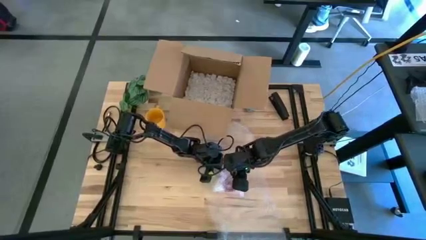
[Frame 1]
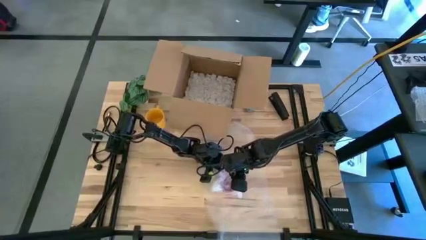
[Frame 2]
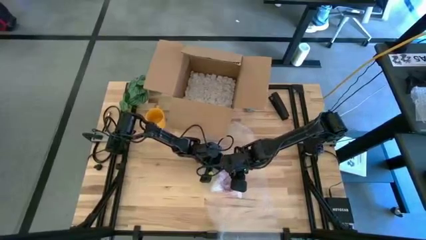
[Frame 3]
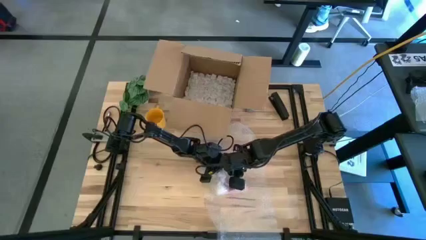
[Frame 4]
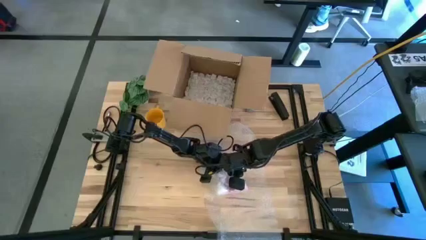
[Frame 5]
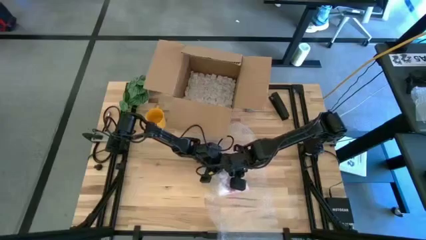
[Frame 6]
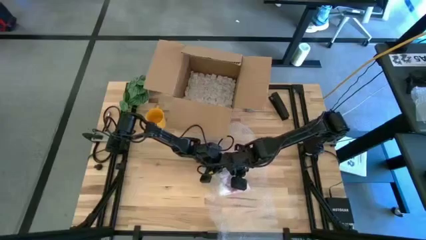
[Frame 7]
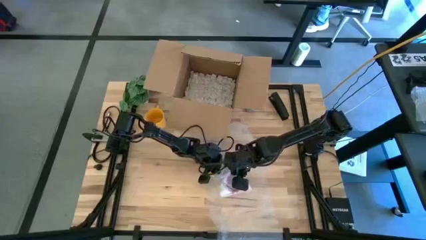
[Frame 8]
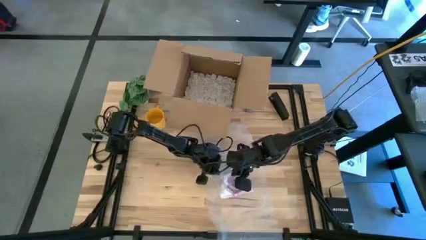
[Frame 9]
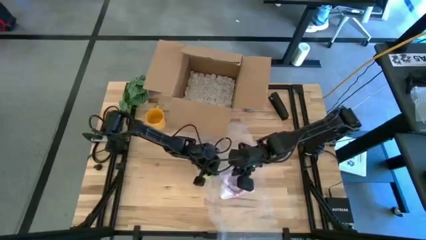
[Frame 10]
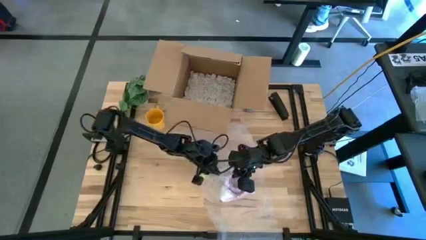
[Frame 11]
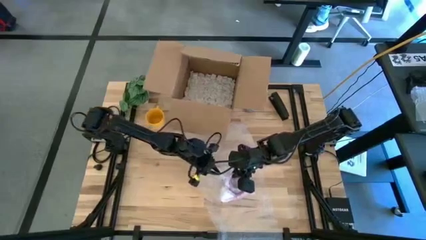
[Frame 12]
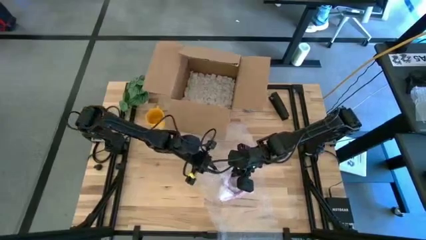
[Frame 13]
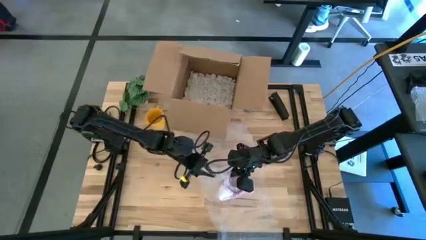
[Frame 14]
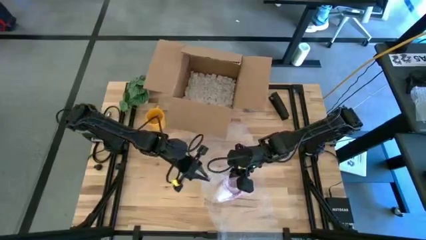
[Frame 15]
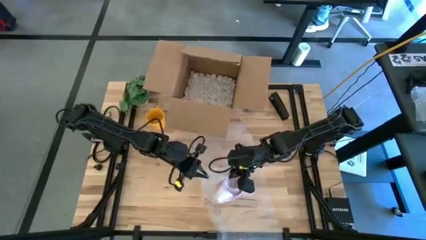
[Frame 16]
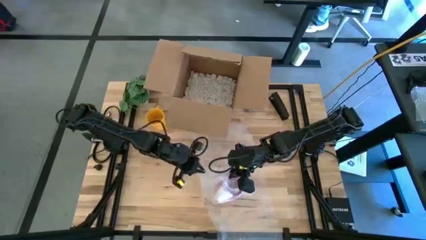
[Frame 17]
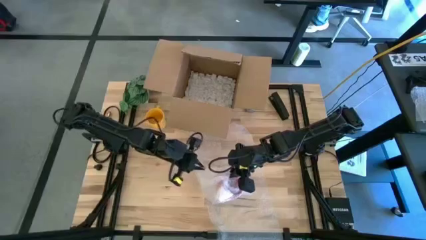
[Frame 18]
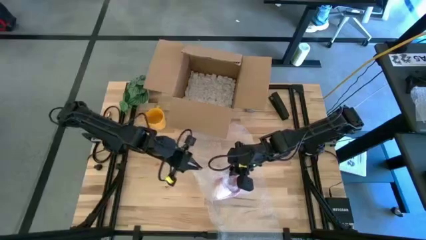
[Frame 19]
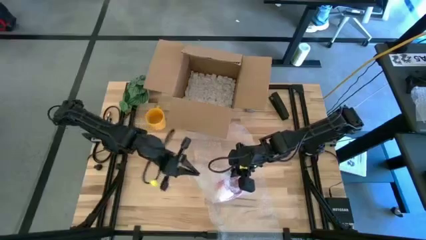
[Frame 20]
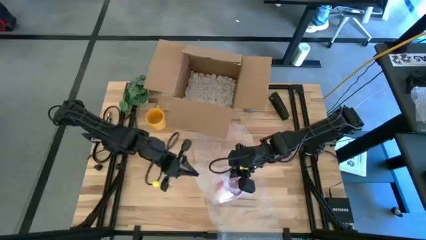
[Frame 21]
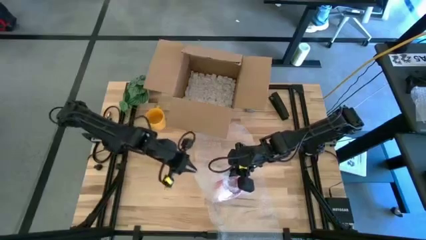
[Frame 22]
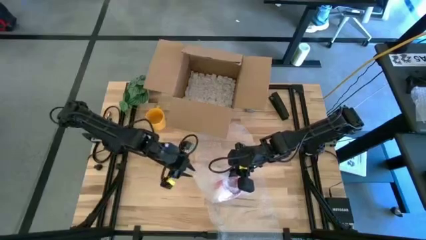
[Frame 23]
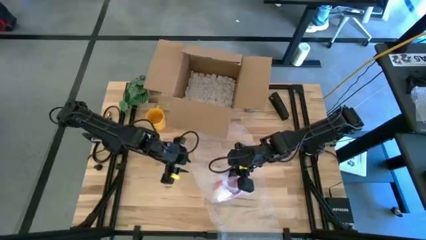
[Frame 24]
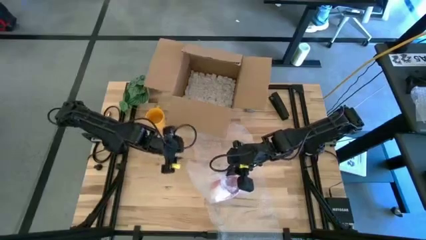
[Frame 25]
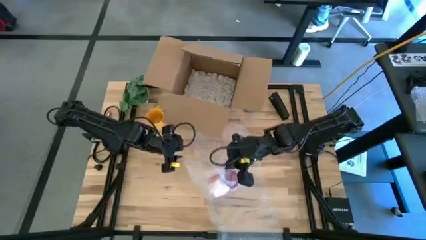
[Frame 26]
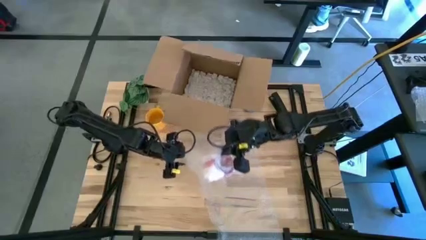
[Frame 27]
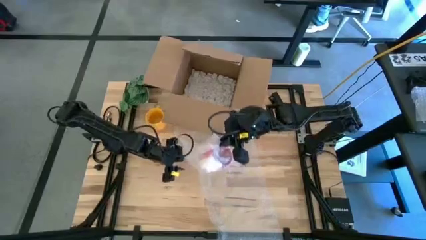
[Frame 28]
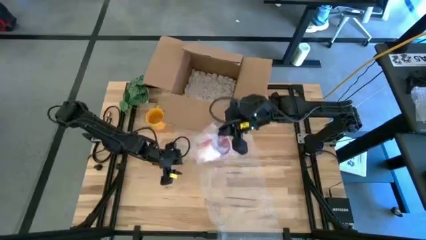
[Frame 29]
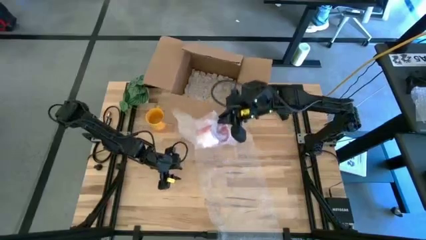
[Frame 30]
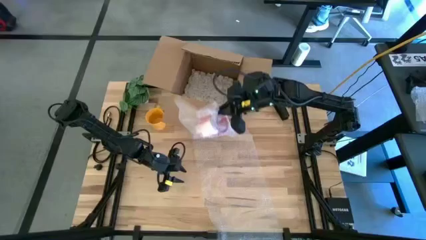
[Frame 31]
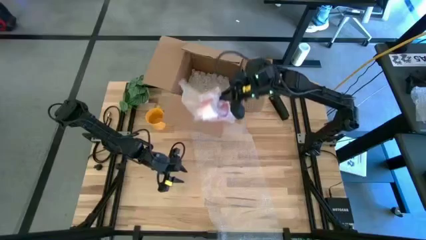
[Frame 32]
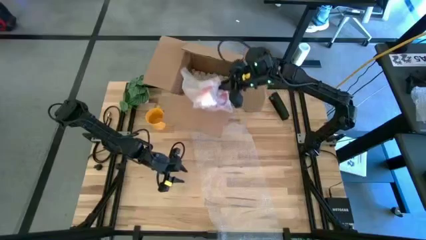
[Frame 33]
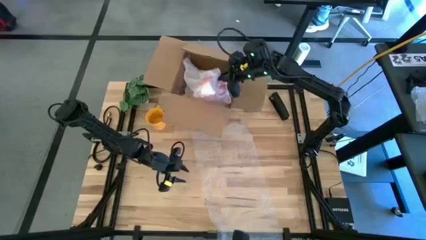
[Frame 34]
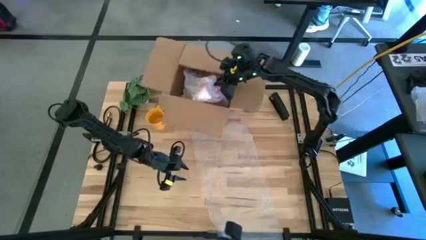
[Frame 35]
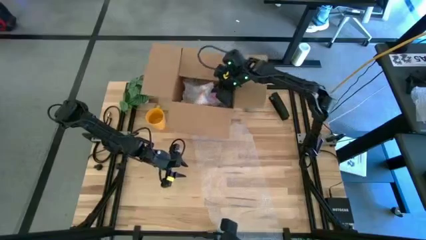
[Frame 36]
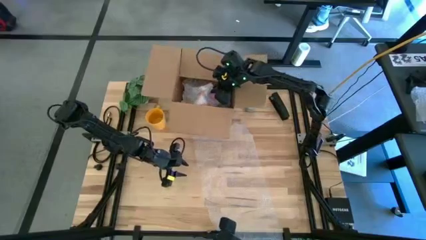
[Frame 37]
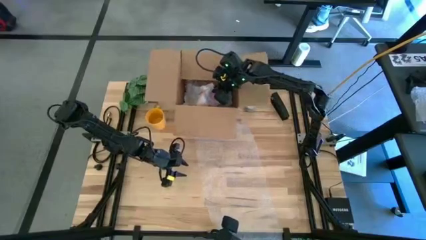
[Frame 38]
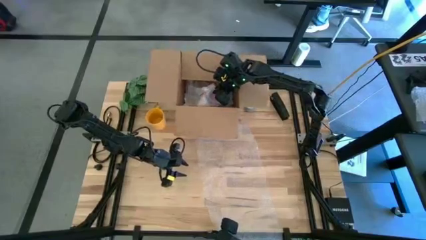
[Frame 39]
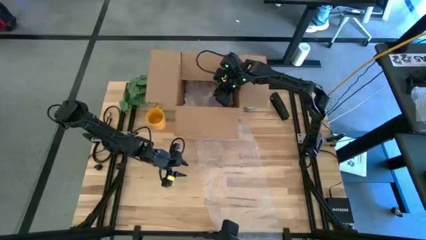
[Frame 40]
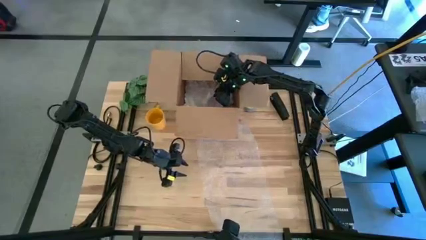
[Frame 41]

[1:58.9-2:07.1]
Task: wrap mug
Put the wrapped red mug into the cardboard box

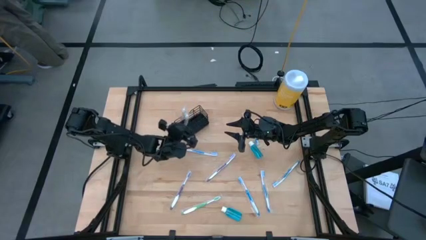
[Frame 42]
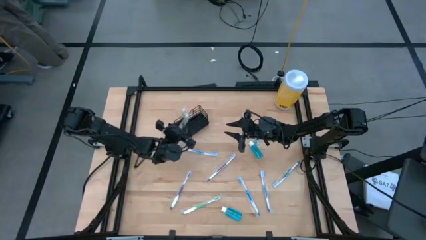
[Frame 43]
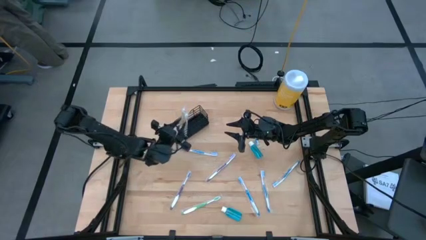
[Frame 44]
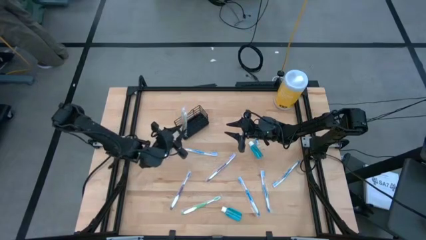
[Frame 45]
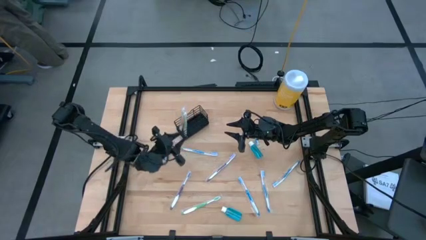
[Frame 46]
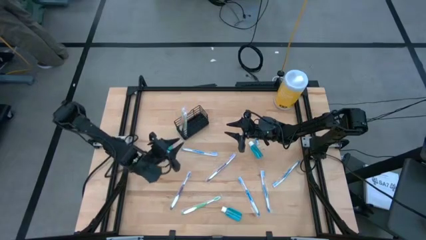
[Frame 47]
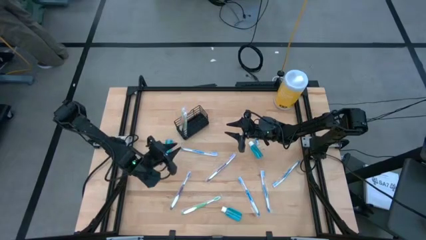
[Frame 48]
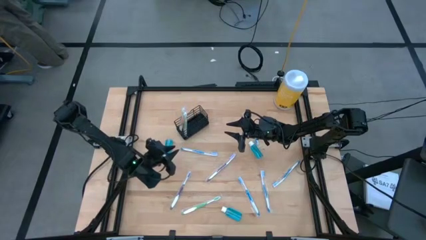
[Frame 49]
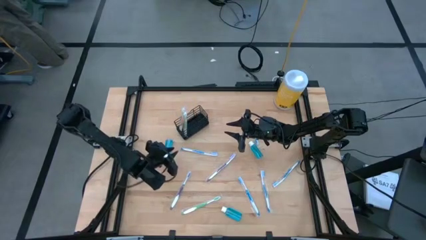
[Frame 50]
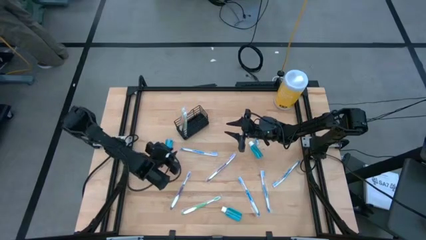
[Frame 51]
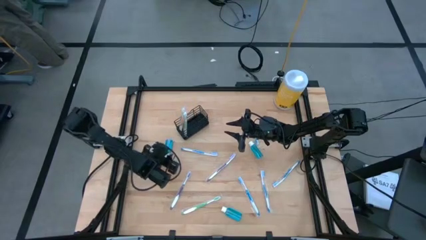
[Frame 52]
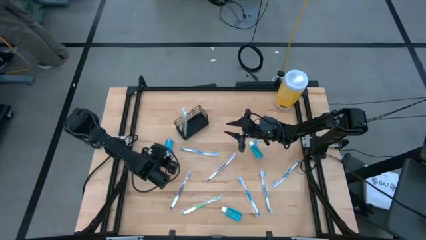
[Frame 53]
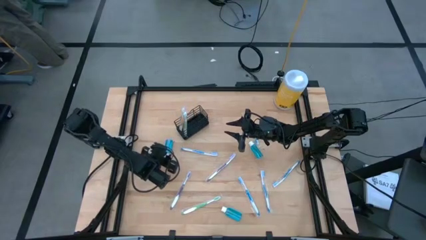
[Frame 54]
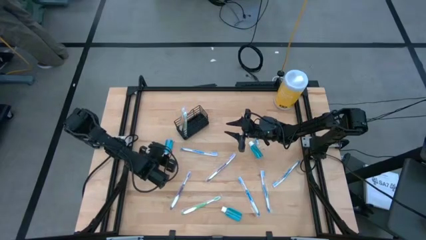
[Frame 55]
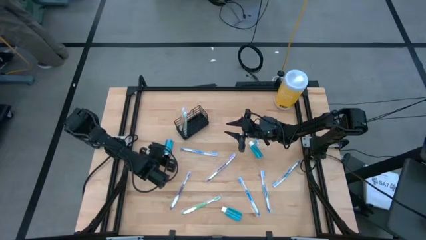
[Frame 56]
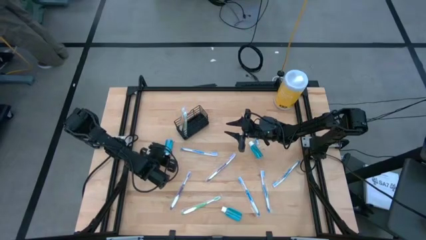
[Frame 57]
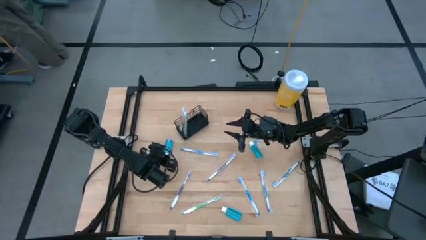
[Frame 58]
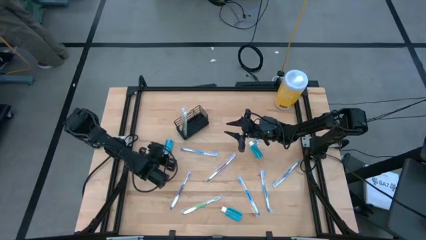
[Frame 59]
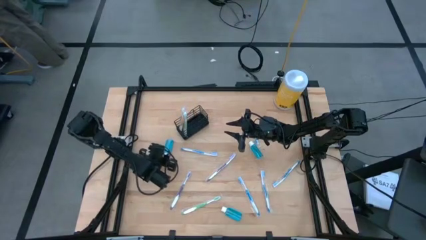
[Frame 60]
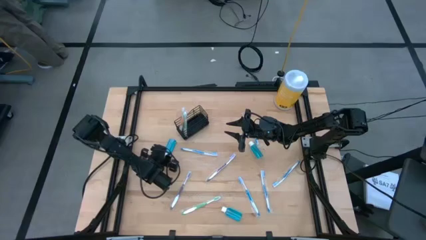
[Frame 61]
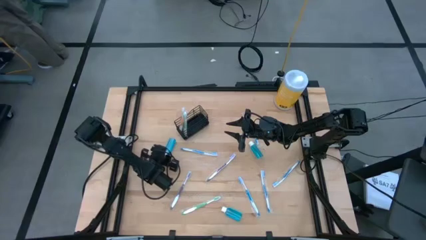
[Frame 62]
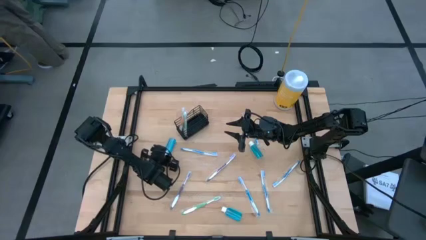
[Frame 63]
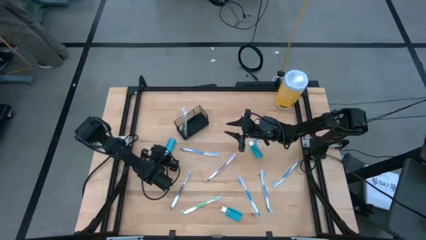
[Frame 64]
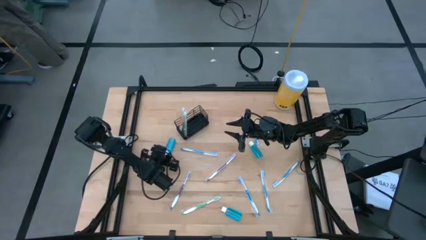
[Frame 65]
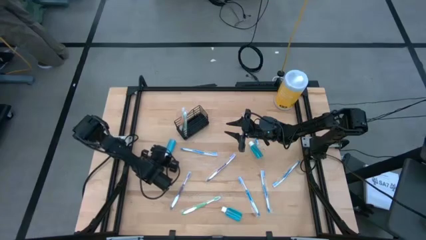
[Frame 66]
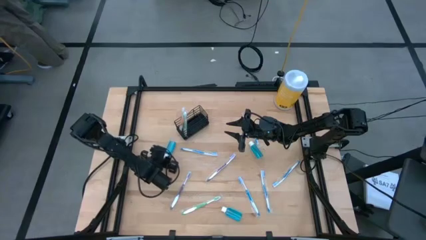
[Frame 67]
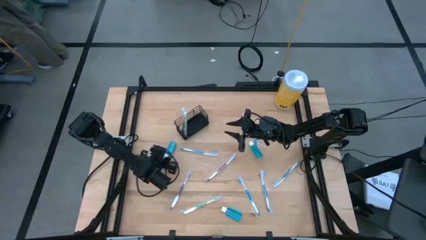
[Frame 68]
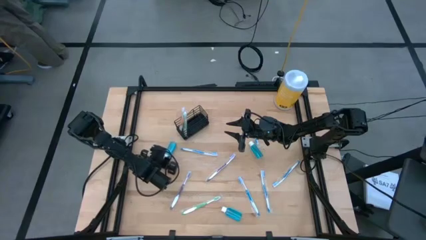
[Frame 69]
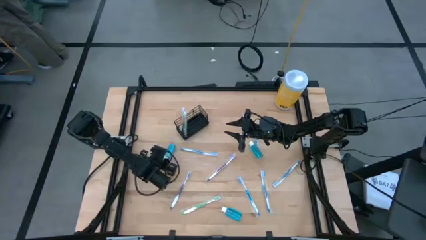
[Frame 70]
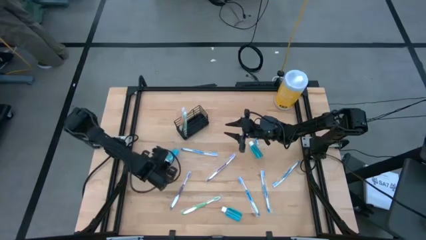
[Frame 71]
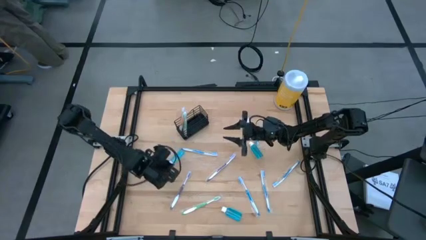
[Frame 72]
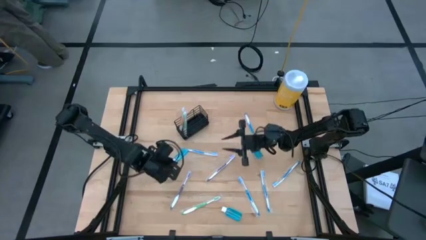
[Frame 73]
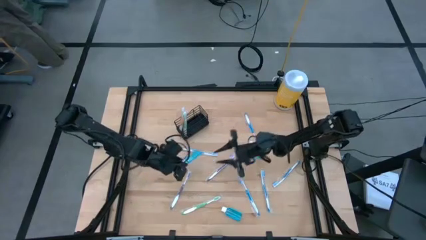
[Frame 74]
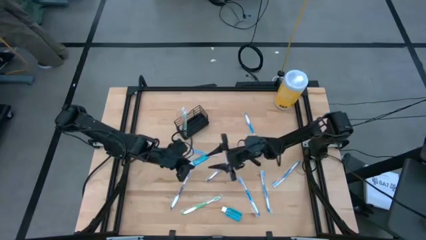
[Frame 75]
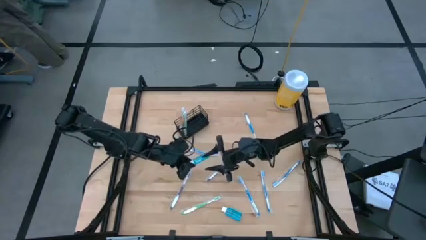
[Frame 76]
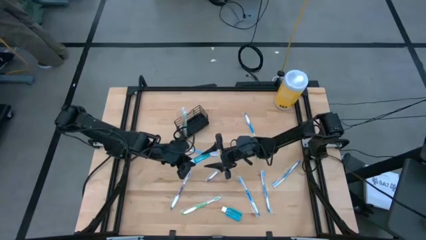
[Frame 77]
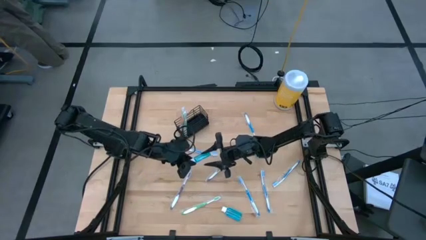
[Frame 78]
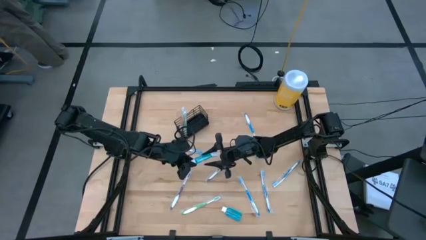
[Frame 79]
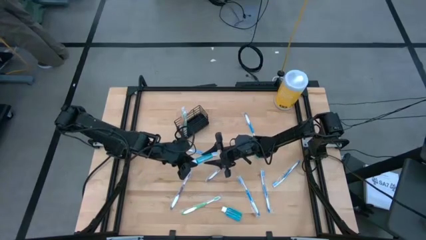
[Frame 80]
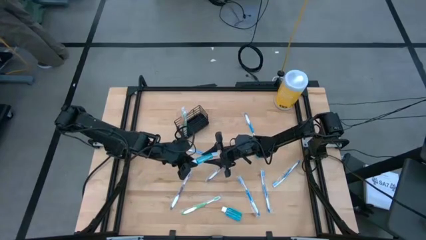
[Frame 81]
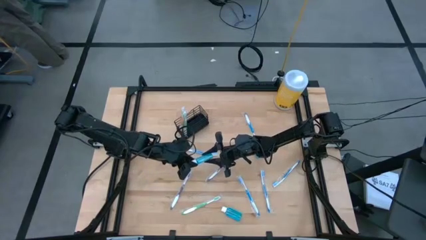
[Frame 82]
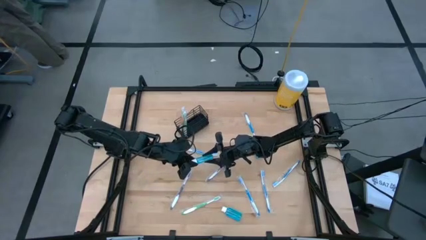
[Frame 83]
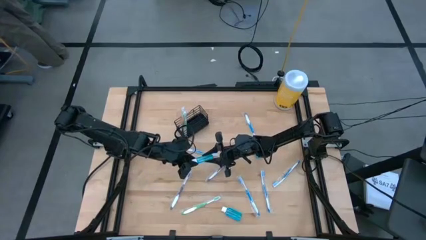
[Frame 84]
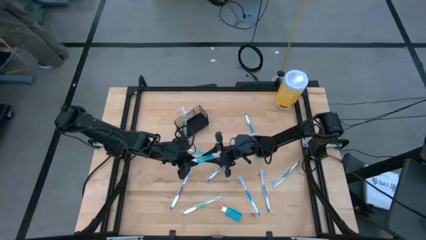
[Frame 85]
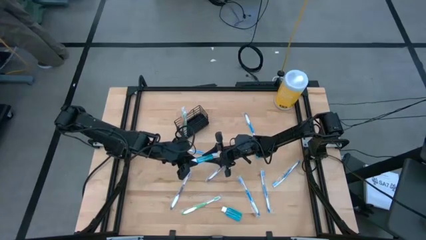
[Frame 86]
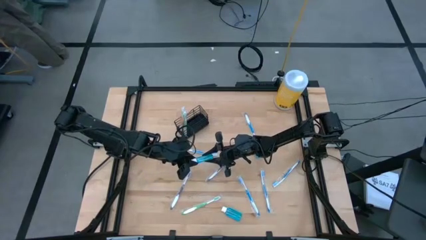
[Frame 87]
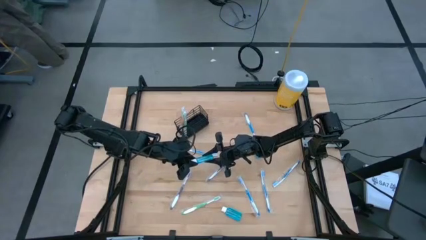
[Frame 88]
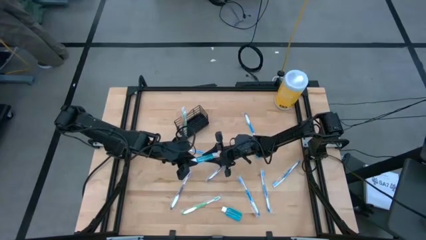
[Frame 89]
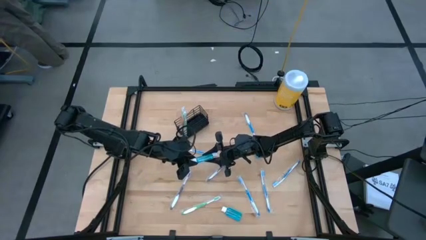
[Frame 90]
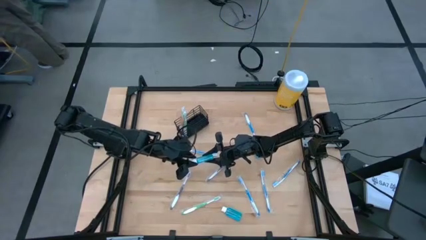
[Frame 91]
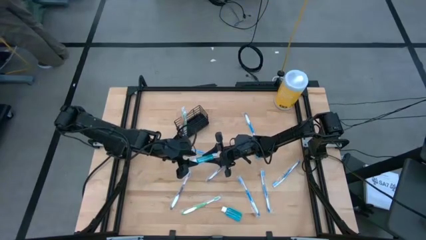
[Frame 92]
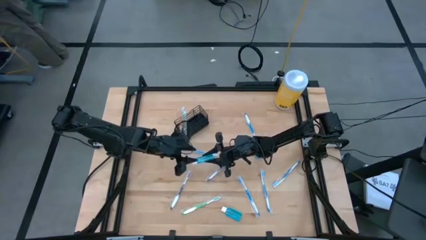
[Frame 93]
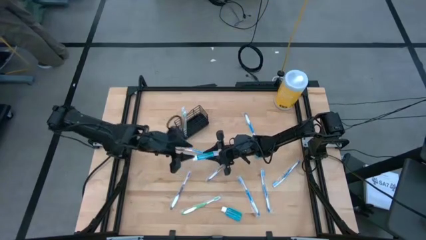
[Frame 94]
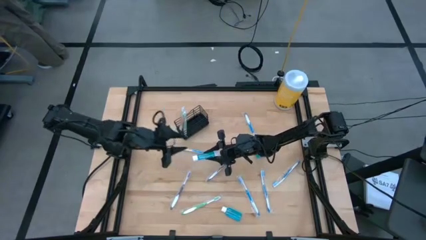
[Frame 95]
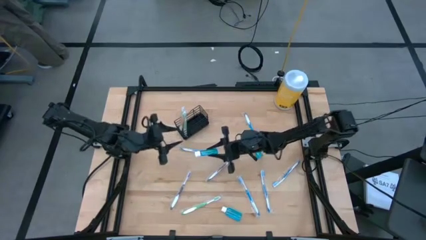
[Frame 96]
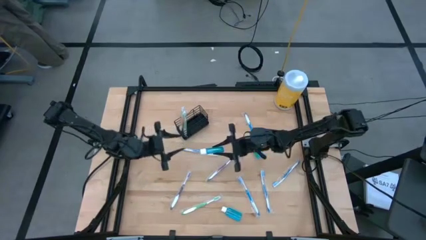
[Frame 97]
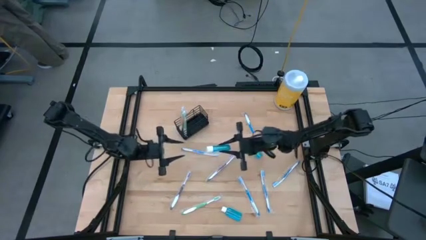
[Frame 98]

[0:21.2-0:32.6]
Task: Pick & Place toothbrushing station
Put the mouthwash into the black wire organizer
